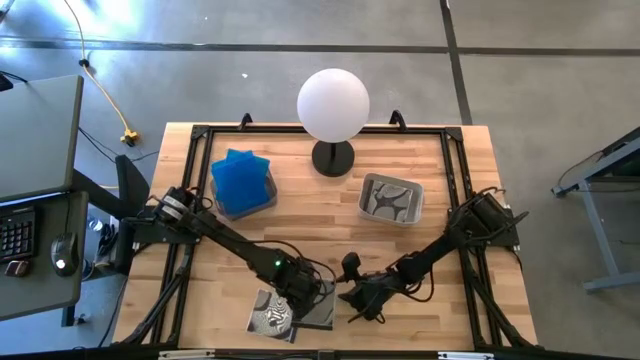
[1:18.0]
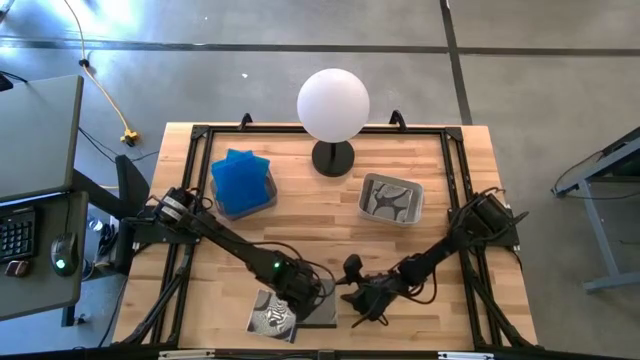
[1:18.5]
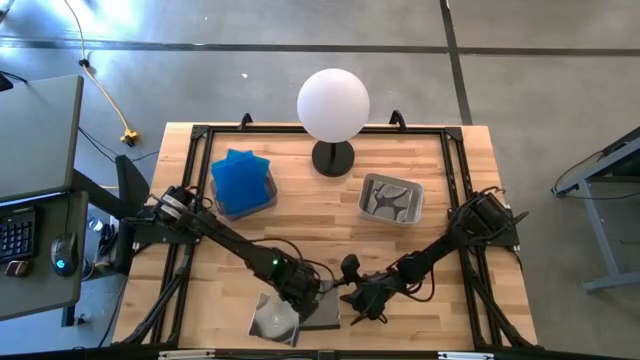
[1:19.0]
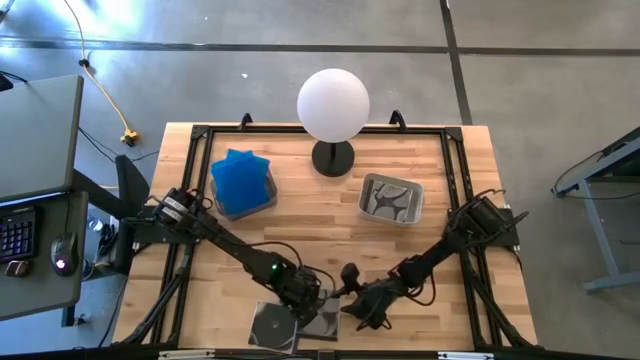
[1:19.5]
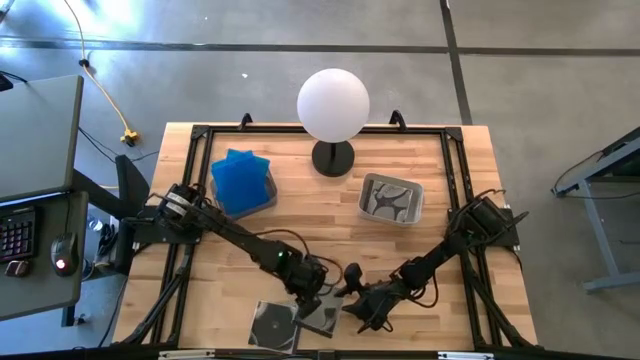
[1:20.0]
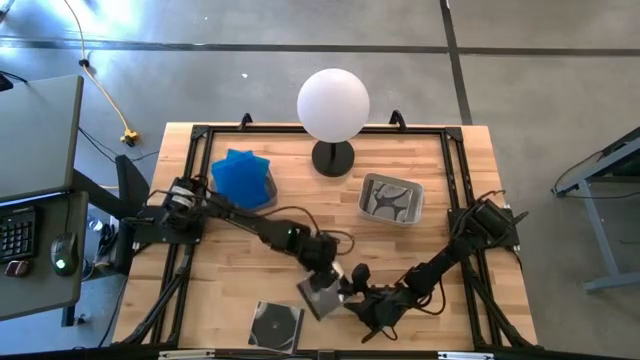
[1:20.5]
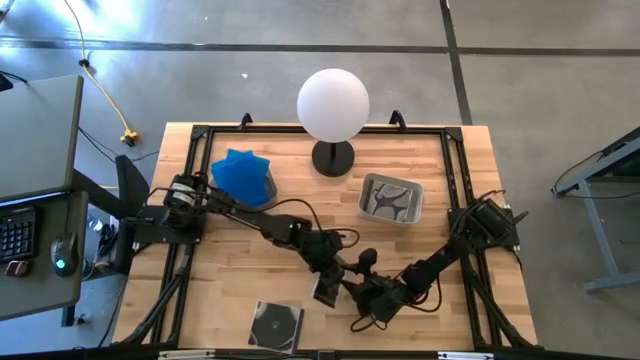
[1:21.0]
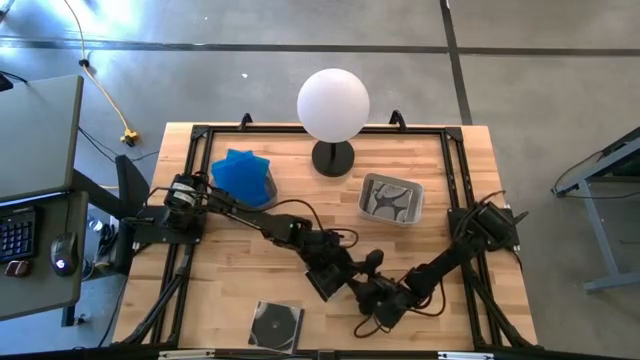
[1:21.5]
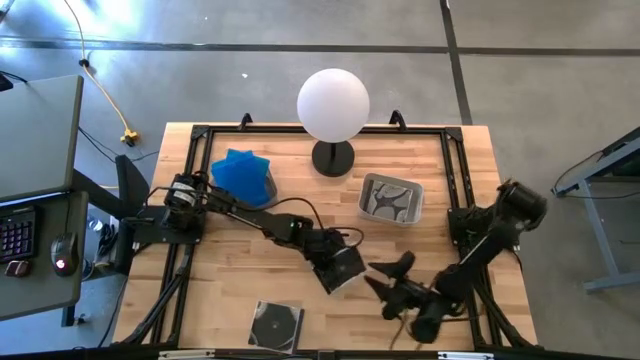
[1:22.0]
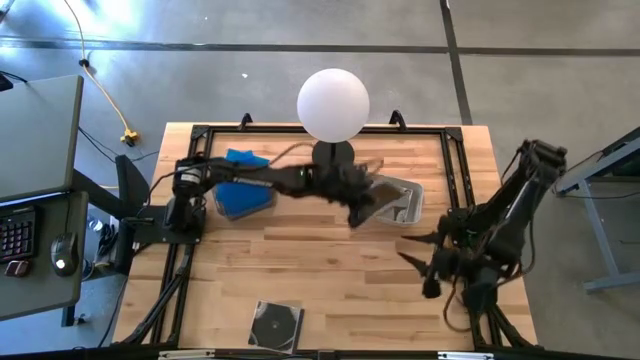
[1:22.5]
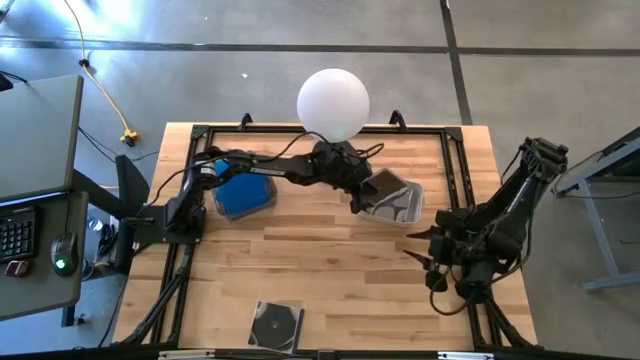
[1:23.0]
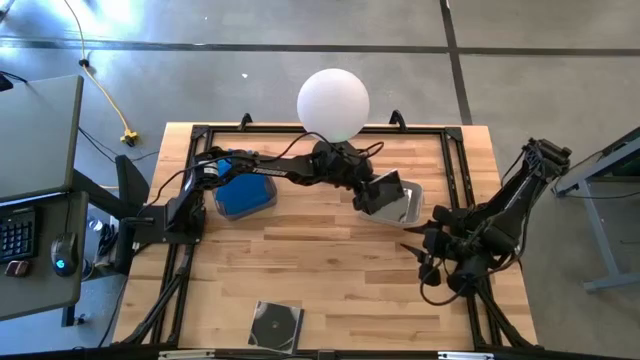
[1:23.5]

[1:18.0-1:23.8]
Task: Pick & place jewel cases by type
Put the right black cd case into the gray bin

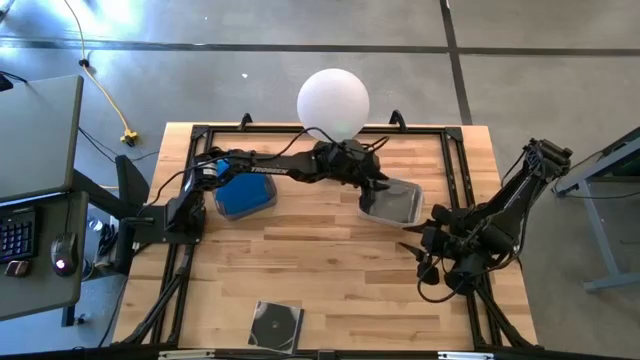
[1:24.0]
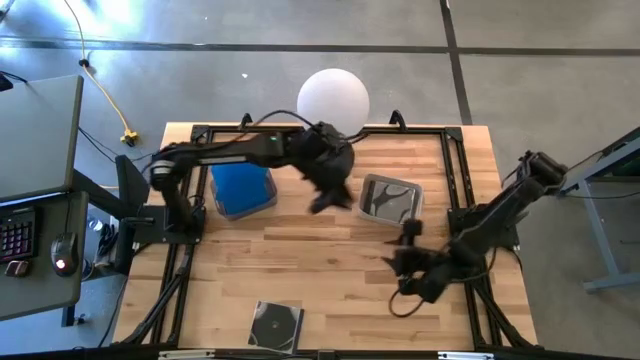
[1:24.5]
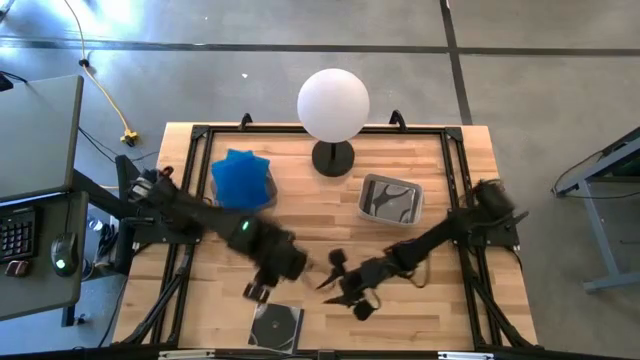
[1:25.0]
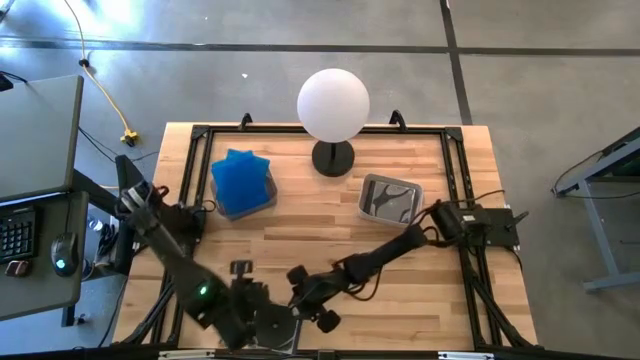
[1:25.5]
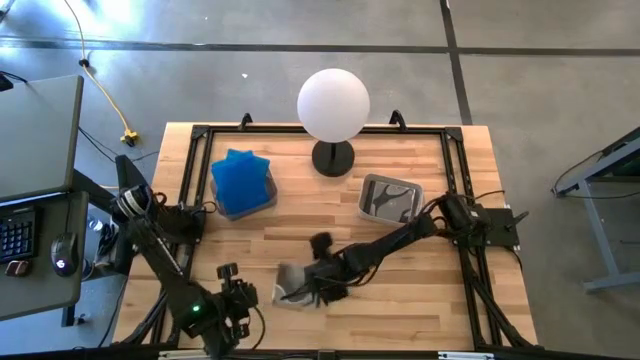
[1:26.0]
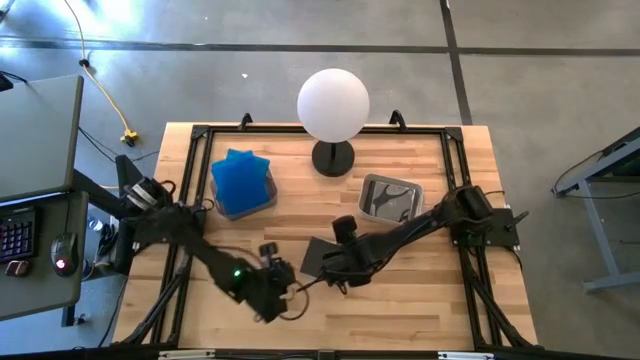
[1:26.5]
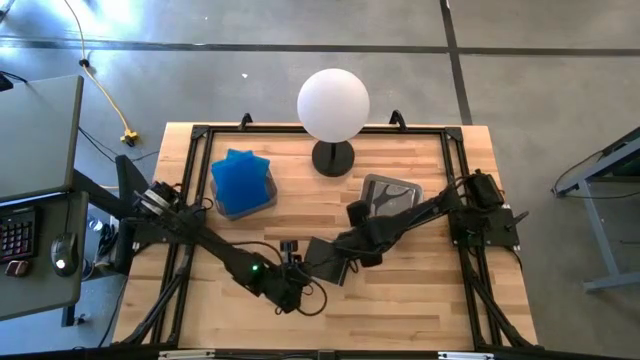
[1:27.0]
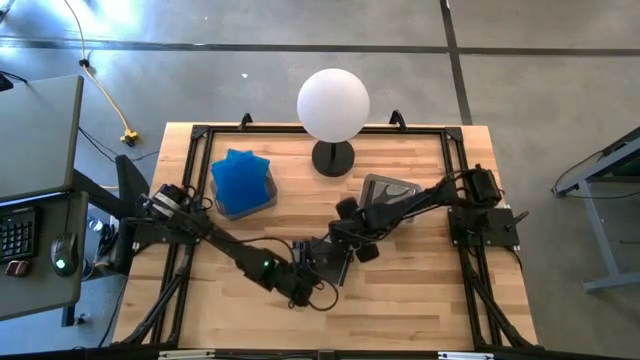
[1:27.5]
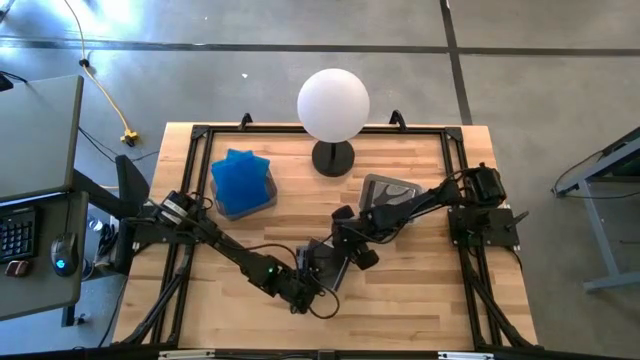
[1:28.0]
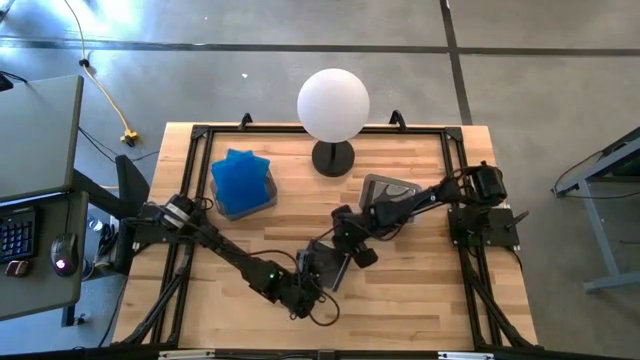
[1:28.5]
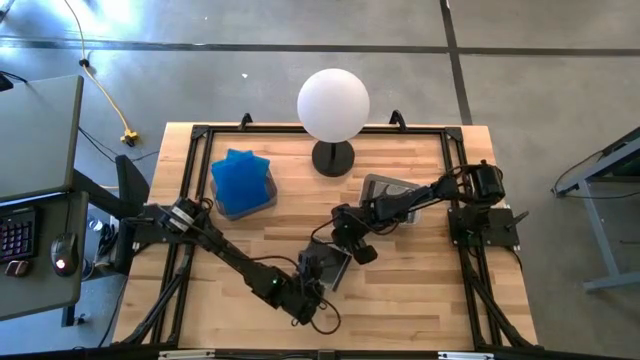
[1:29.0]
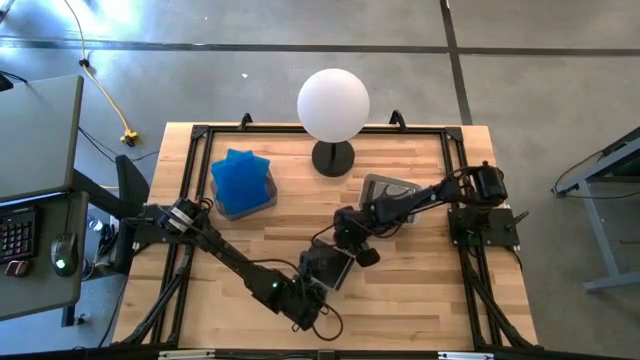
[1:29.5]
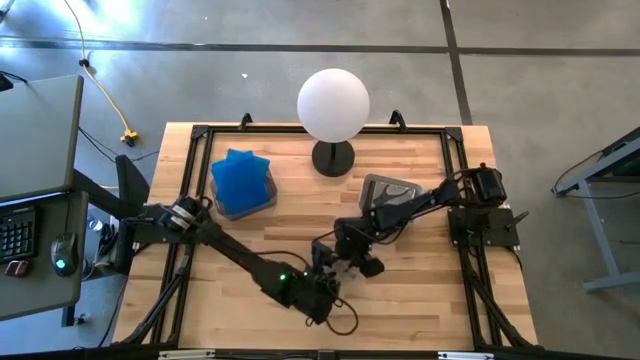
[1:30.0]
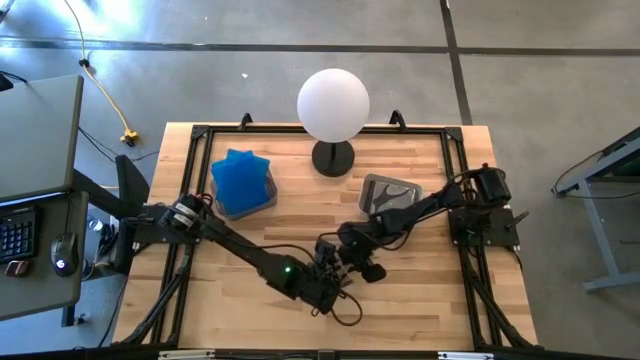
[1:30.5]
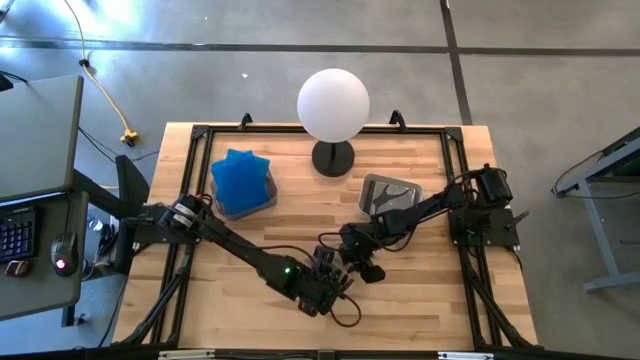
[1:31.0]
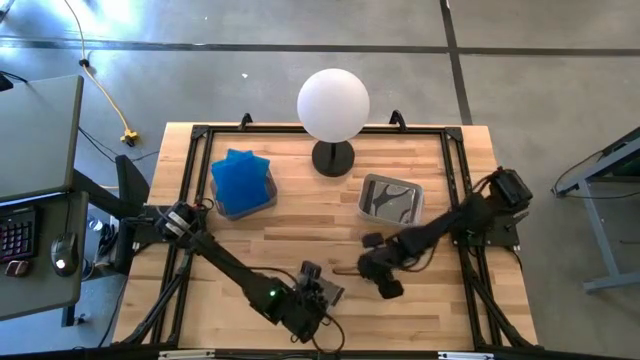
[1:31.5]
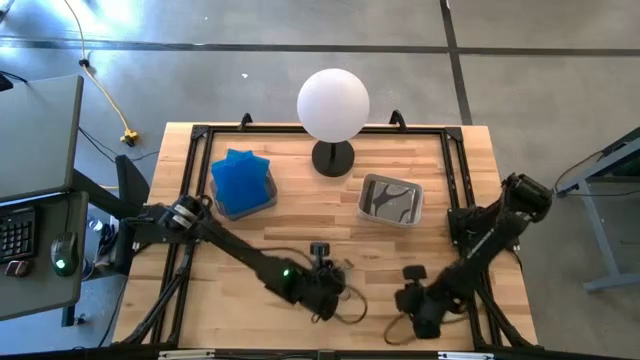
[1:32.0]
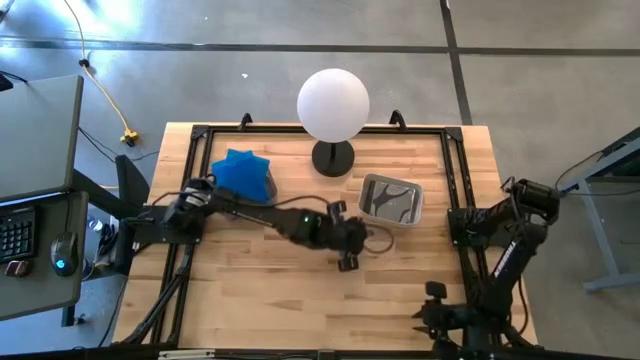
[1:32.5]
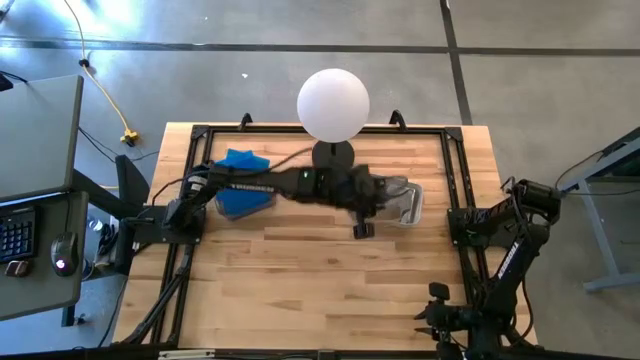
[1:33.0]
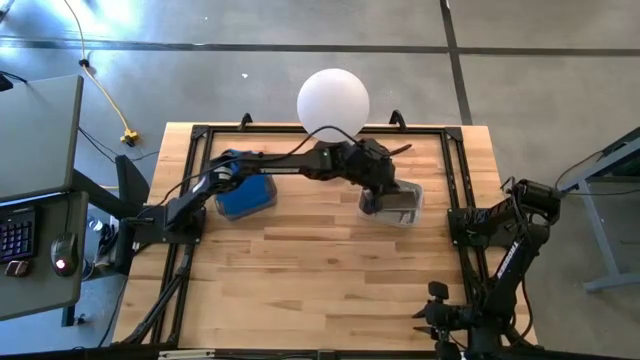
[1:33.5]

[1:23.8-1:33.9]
Put the black cd case into the gray bin

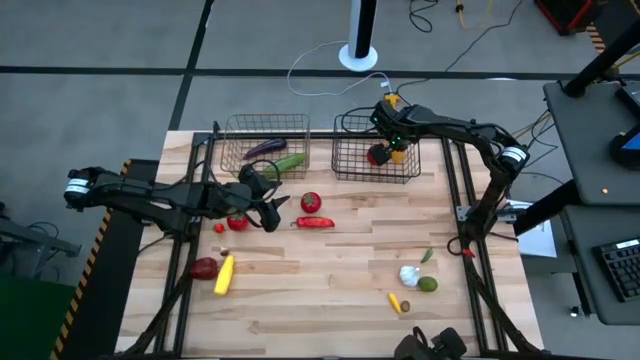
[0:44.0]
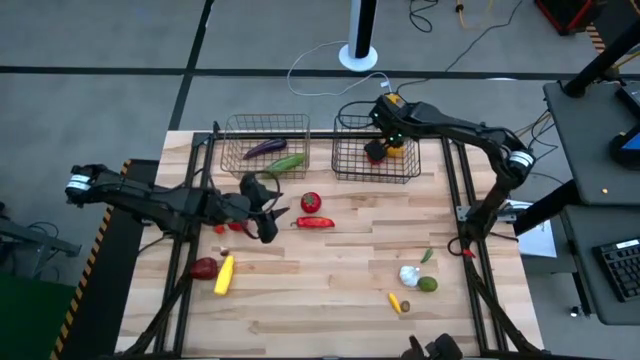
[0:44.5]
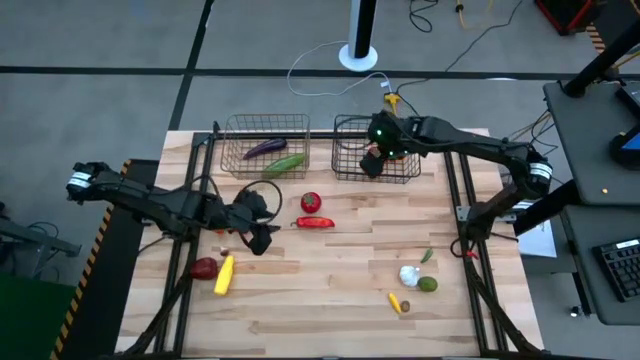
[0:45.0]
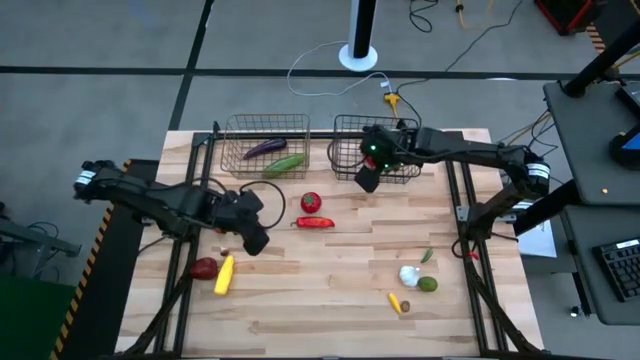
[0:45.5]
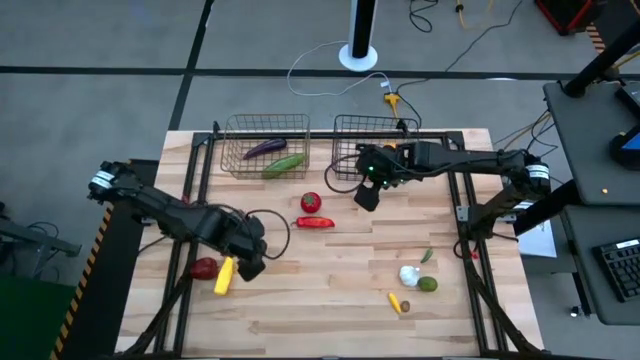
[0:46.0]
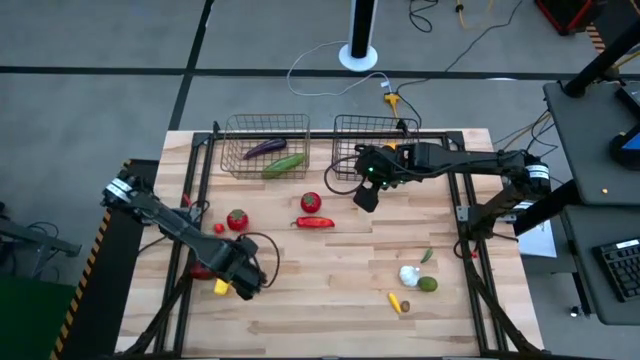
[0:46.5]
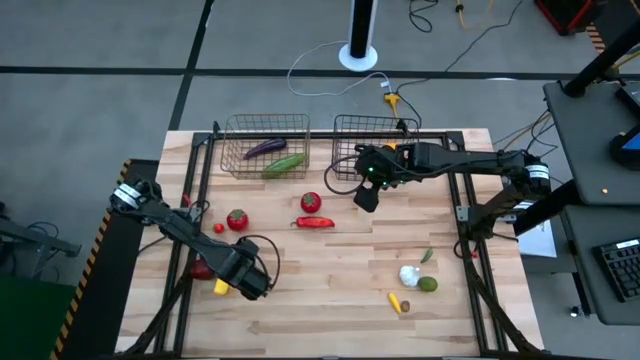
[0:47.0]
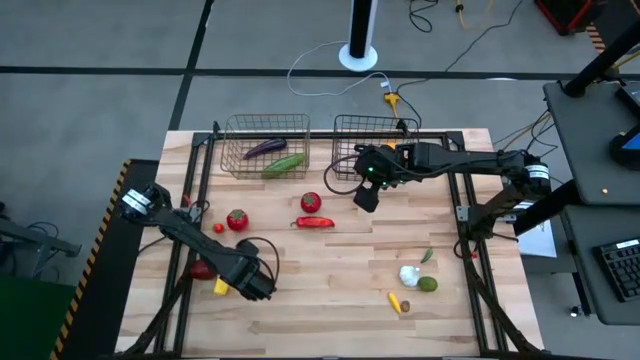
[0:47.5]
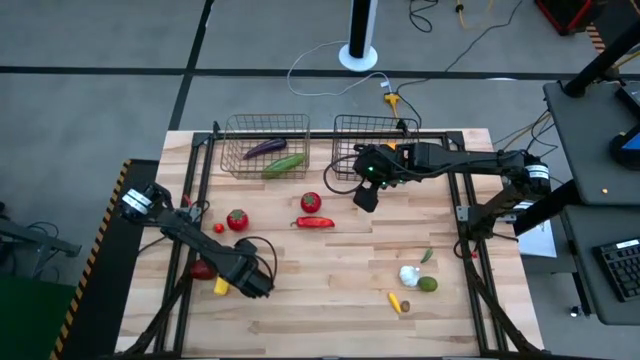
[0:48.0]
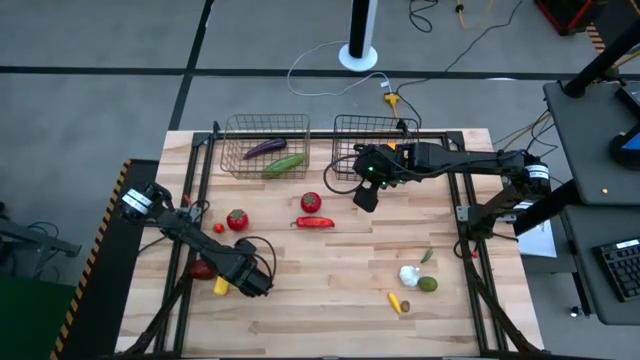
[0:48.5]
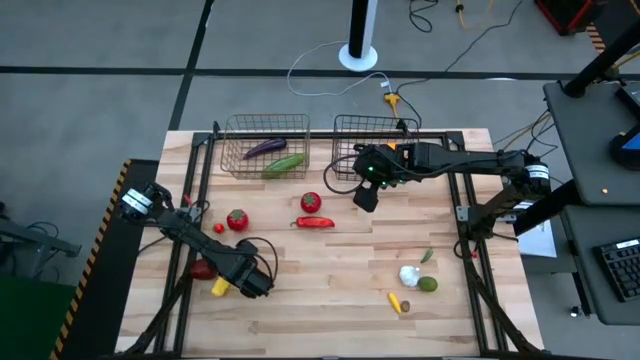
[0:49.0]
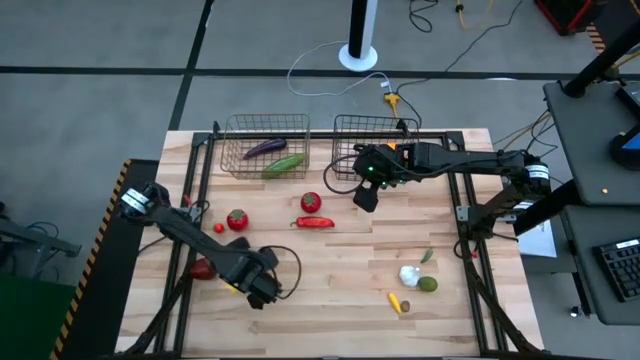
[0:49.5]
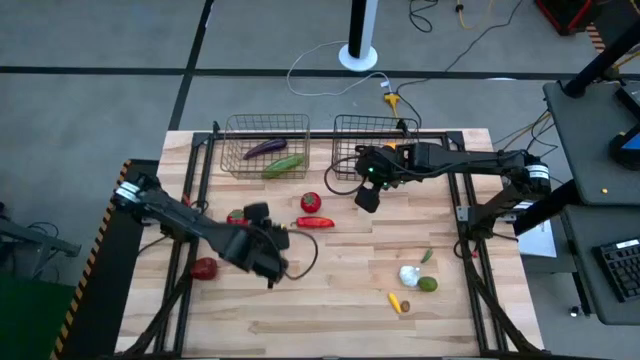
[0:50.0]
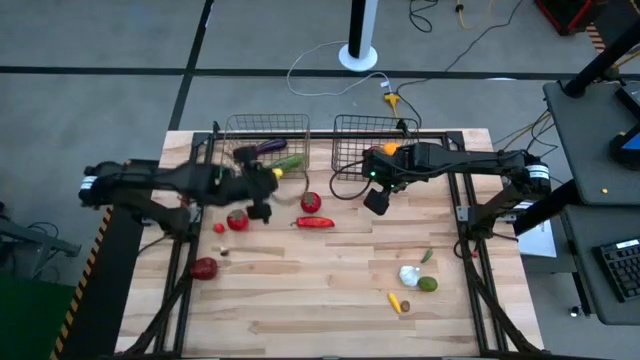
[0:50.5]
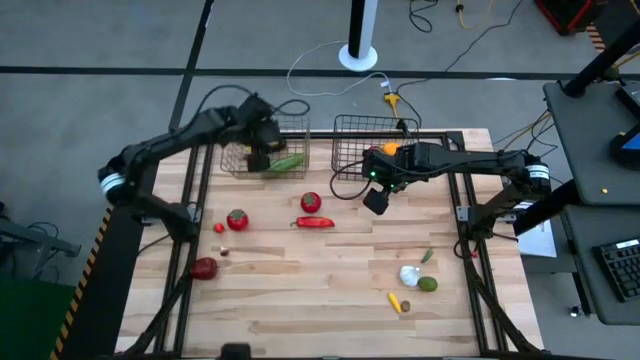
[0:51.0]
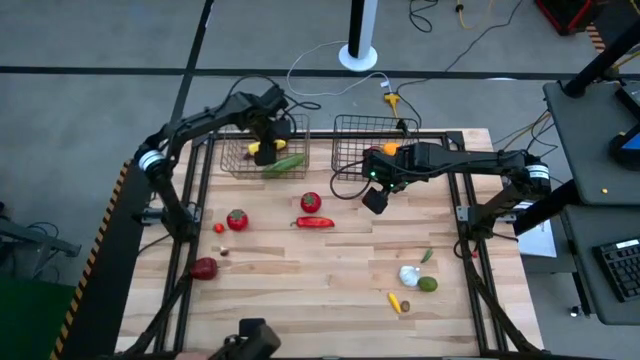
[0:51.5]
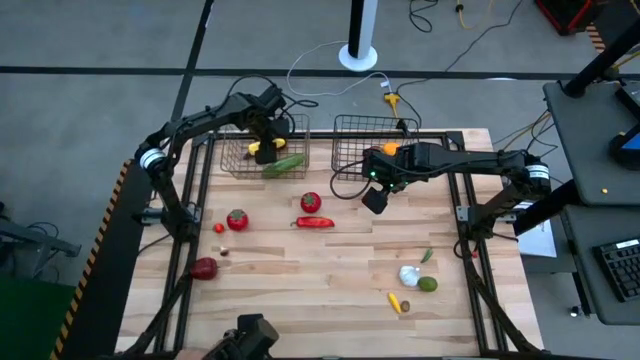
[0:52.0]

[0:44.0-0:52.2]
Task: Sort produce into baskets
Put the large yellow corn into the left wire basket
